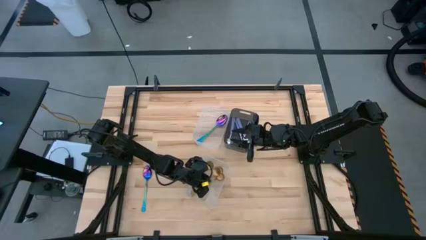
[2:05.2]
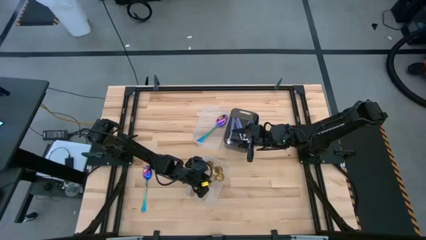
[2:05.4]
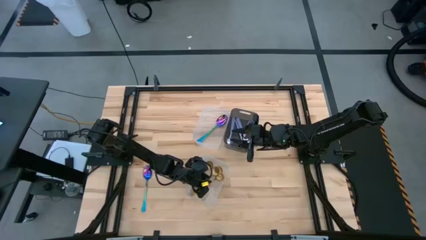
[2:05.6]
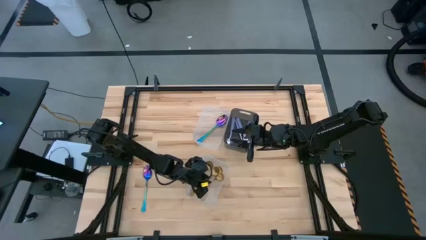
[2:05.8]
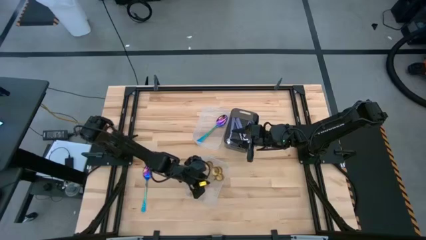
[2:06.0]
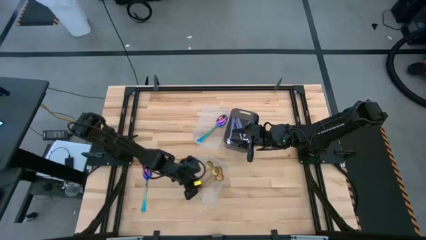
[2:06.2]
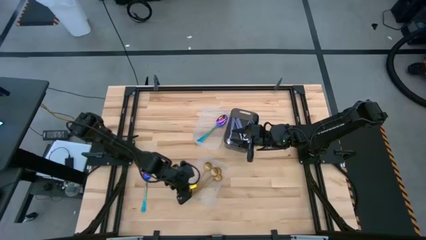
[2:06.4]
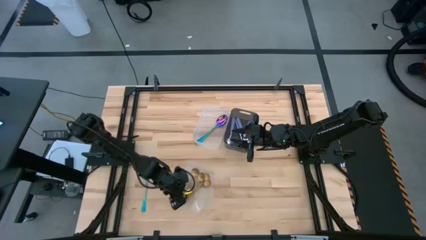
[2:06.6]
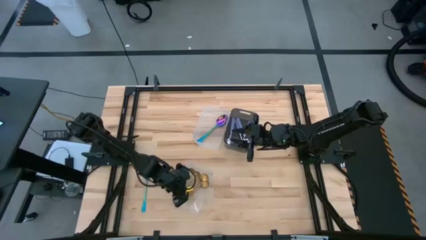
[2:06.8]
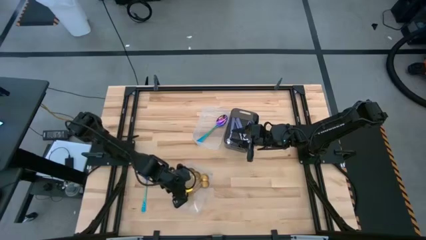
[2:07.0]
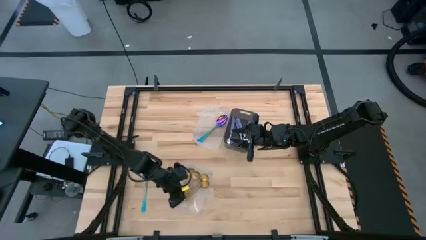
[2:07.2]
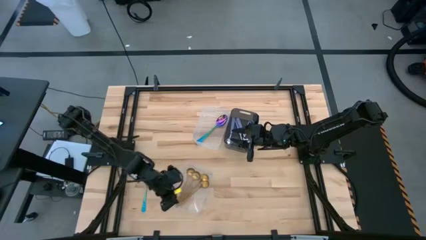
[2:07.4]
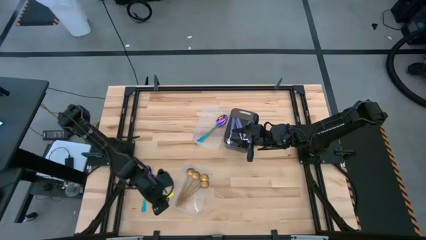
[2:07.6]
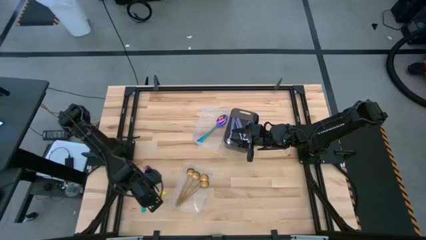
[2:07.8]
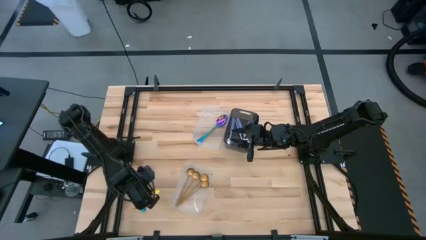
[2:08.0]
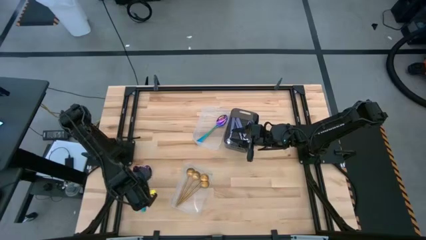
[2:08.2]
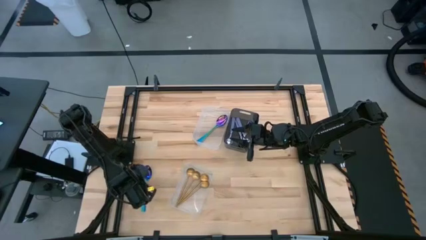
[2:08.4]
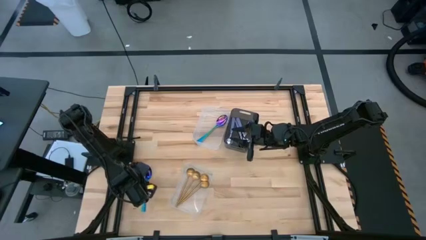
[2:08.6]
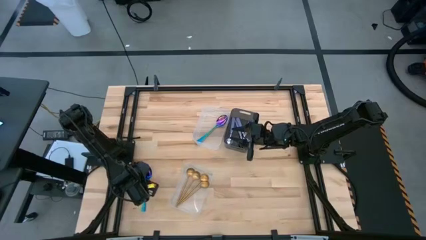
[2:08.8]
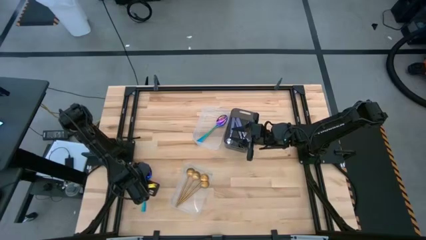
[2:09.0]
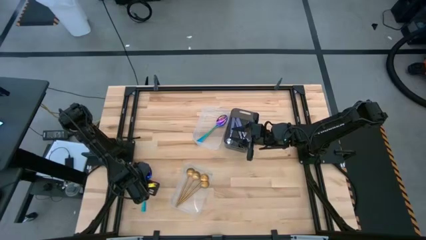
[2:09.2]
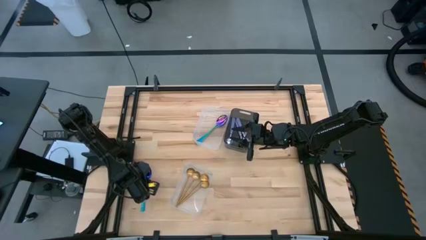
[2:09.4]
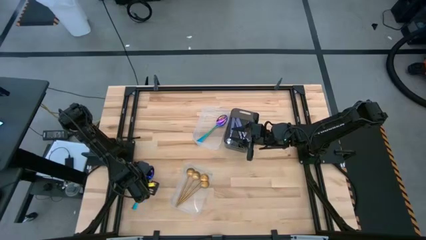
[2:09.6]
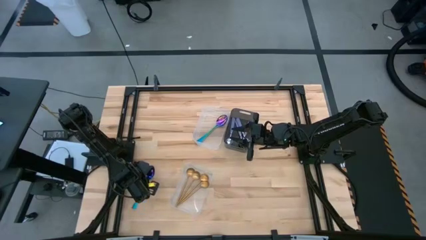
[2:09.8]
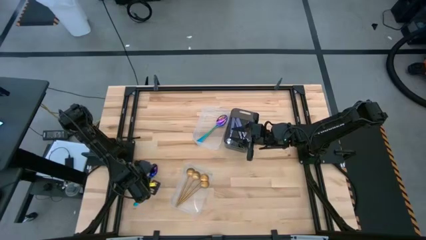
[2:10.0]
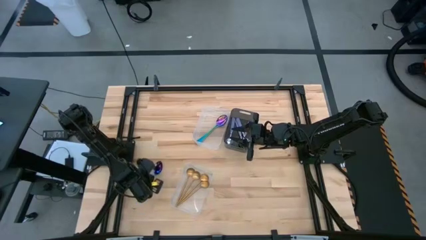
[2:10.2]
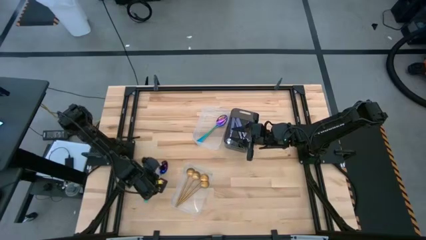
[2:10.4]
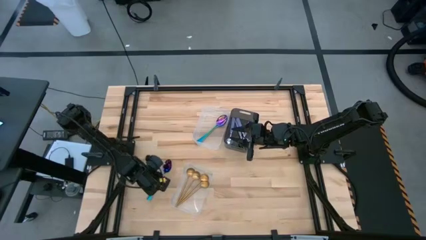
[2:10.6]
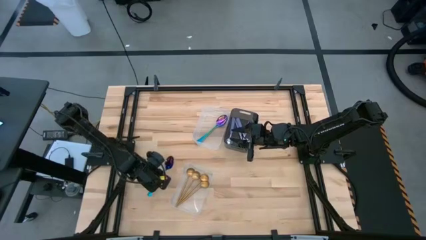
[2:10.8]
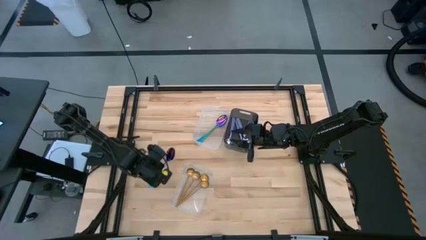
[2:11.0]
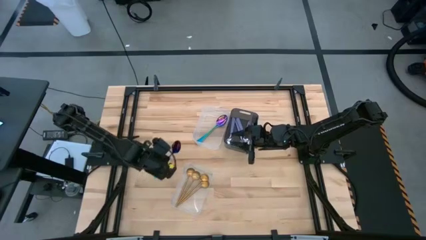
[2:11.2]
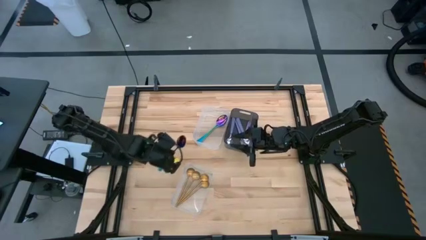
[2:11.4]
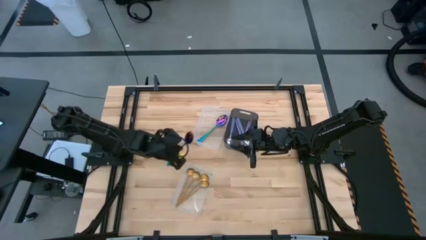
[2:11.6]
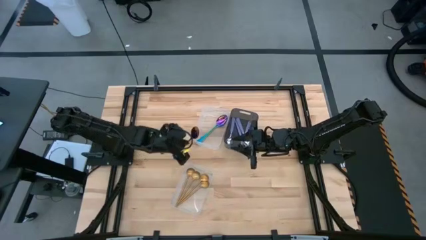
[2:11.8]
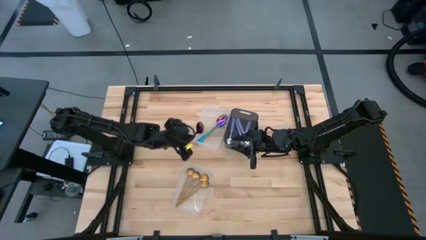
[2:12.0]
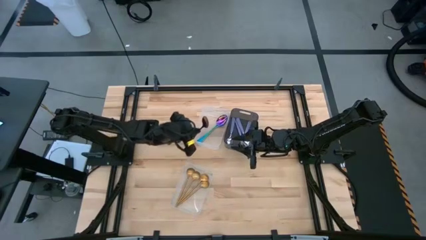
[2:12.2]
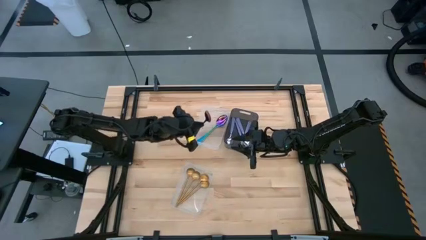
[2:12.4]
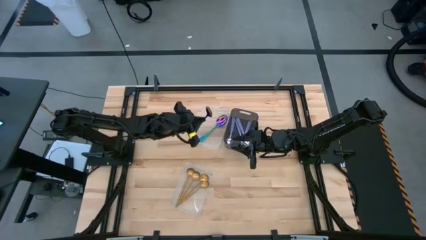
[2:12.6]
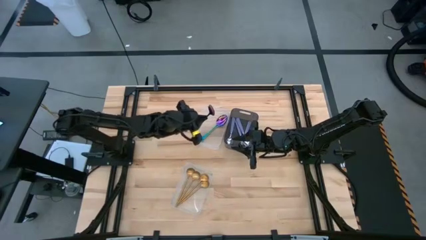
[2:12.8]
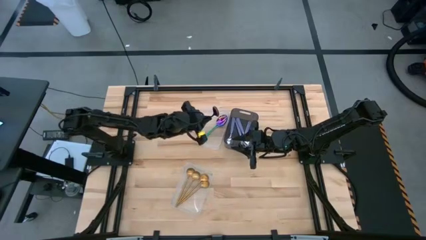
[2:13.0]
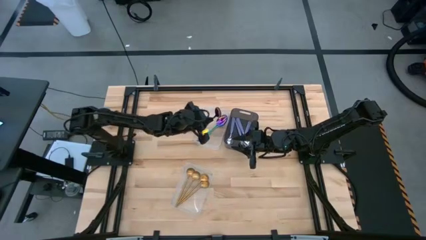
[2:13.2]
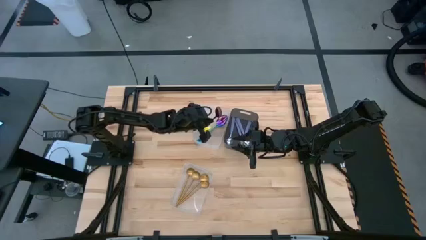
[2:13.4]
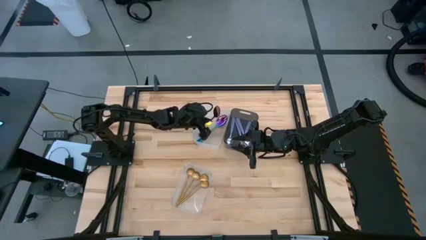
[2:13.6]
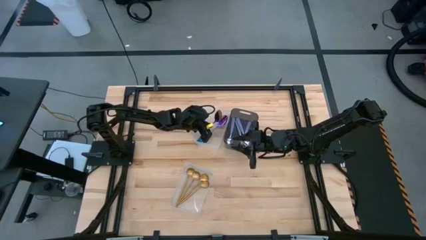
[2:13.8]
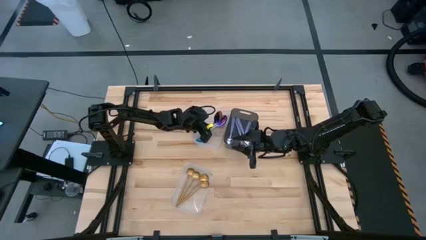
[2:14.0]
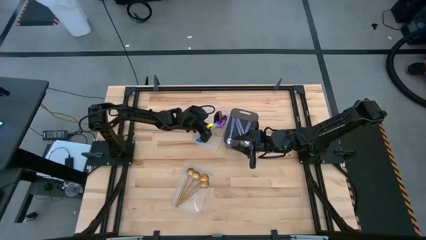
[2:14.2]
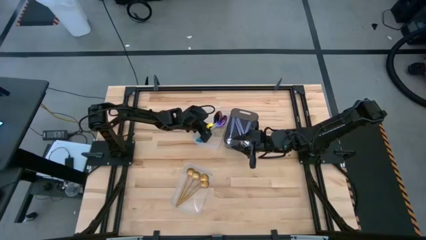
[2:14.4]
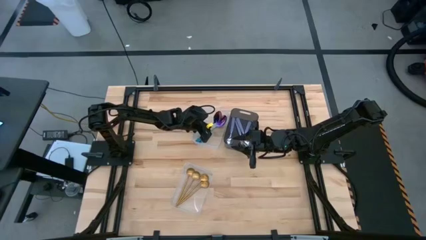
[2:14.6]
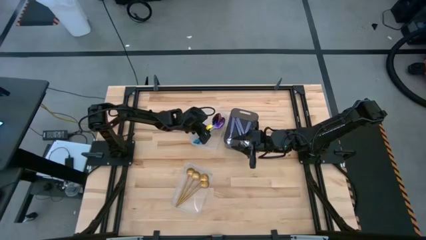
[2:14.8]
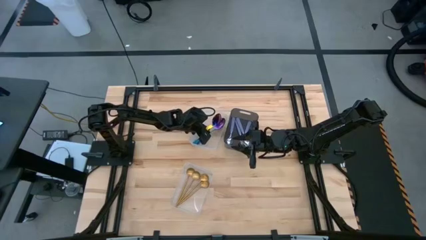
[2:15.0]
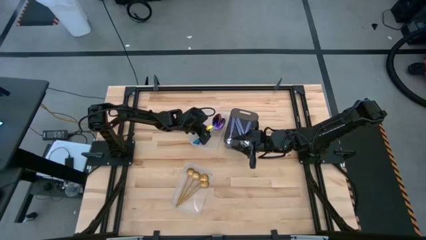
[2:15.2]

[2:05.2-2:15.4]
Task: Sort silverware by color (type)
Put the blue spoon into the top transparent bin

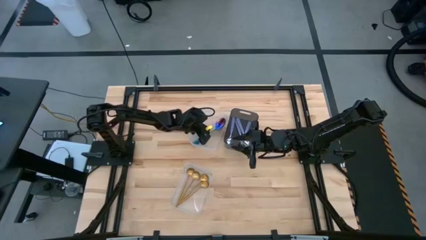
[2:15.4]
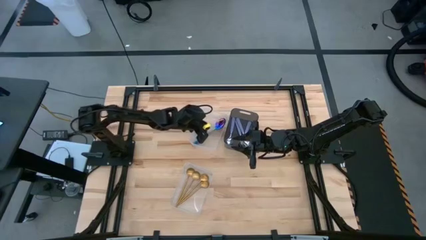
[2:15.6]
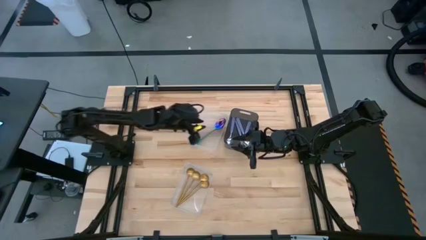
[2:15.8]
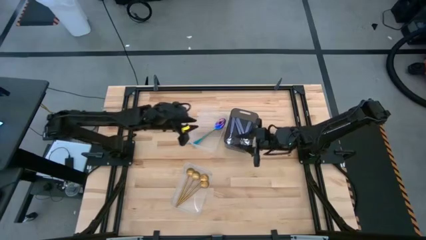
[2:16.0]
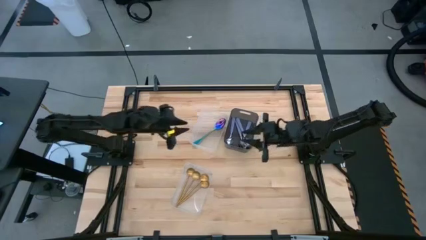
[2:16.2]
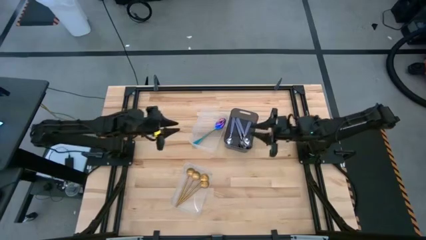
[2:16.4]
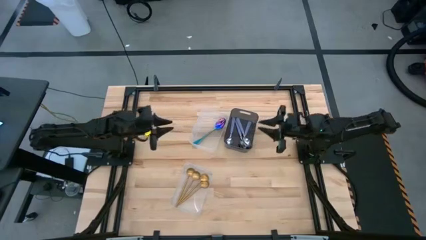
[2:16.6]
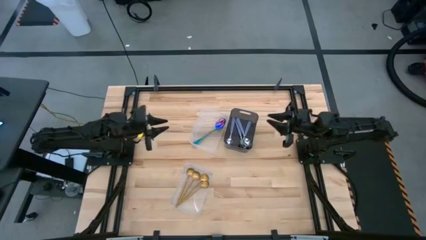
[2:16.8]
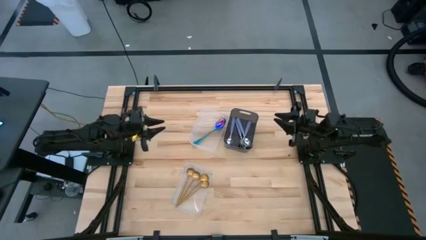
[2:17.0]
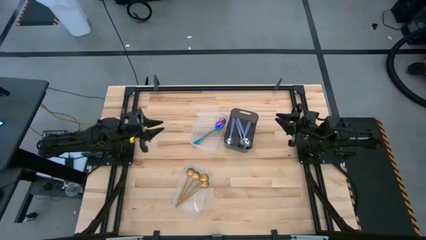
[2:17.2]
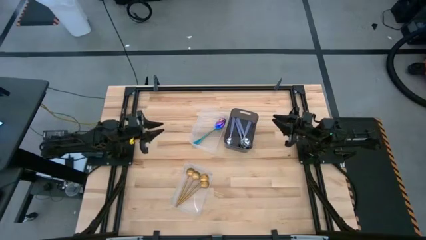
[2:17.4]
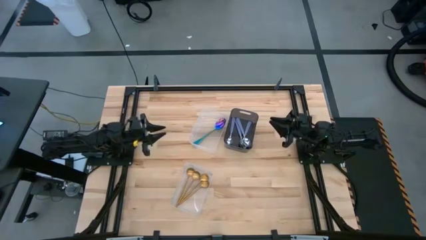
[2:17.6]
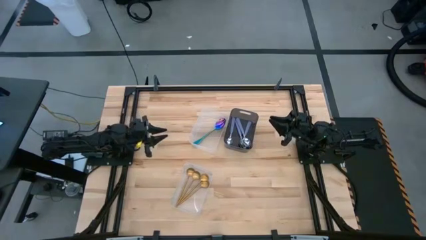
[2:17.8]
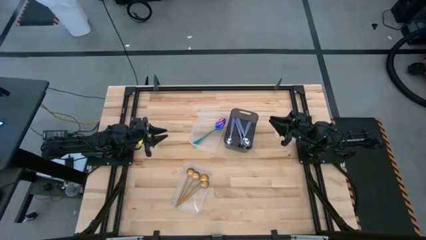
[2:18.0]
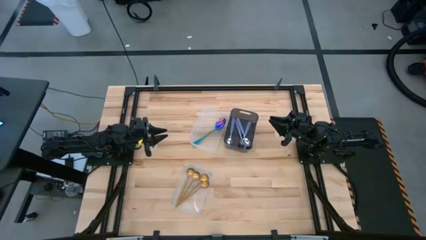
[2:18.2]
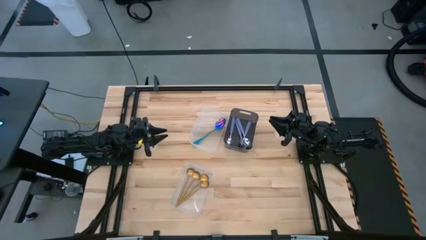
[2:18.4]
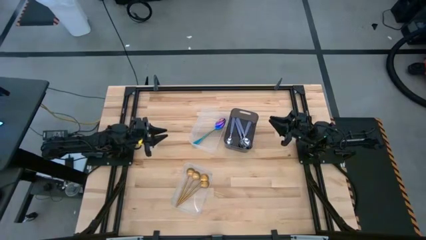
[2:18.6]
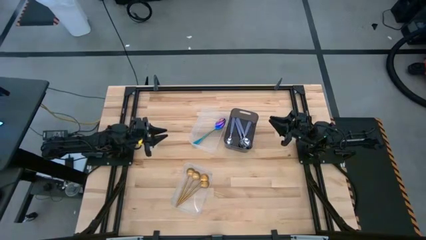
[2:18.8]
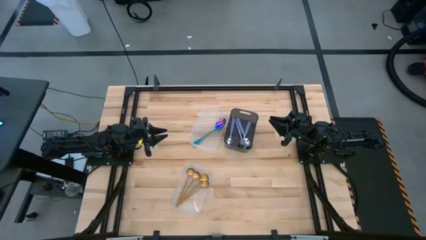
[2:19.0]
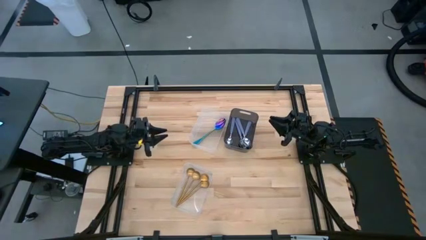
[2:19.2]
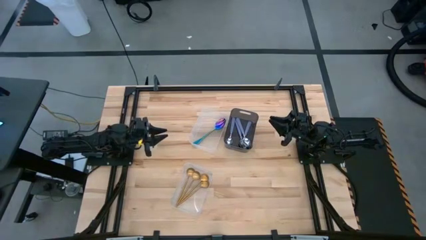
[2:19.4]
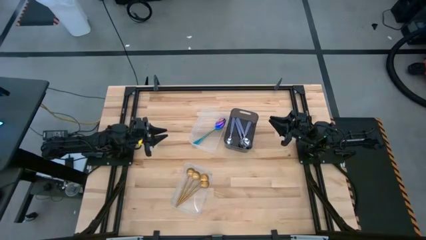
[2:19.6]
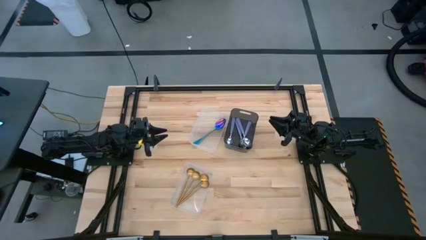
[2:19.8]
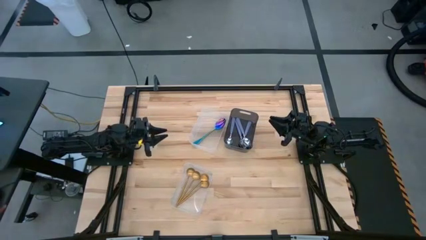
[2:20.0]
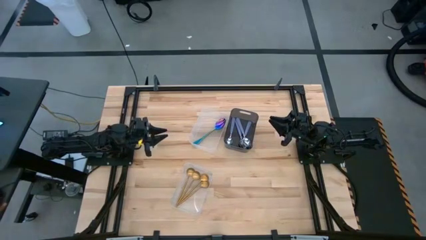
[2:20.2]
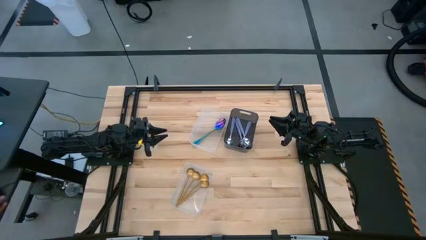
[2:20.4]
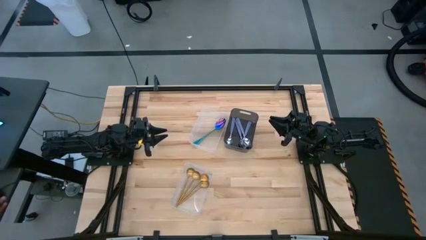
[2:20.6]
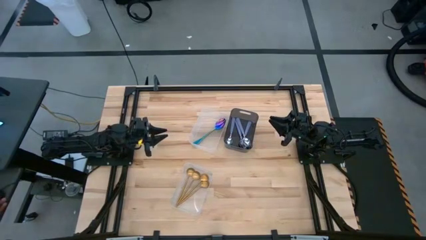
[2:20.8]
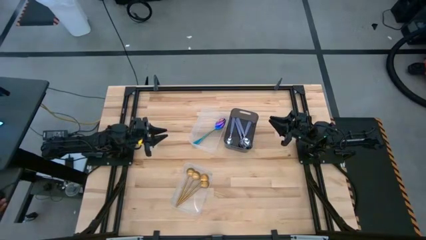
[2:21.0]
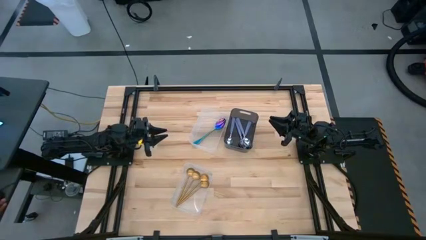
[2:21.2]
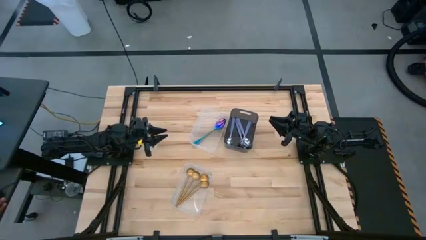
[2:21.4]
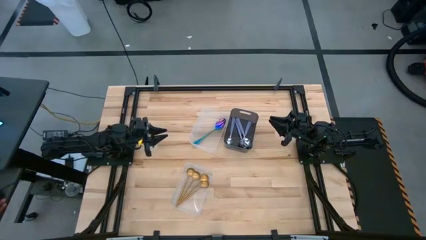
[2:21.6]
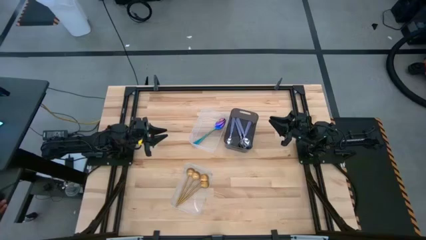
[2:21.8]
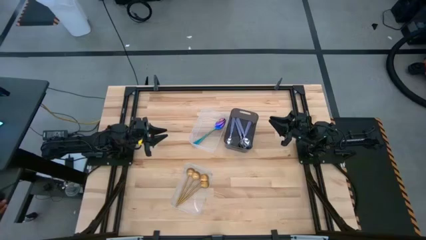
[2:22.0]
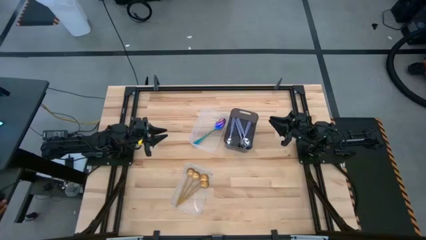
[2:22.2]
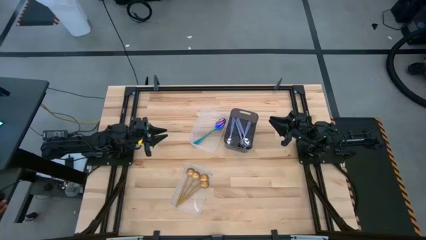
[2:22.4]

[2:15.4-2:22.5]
Return to home position
